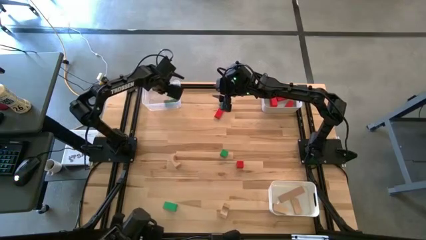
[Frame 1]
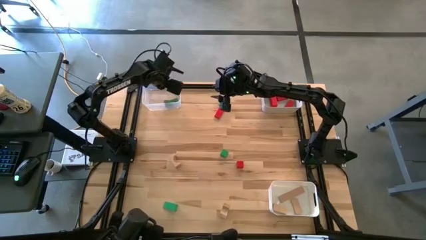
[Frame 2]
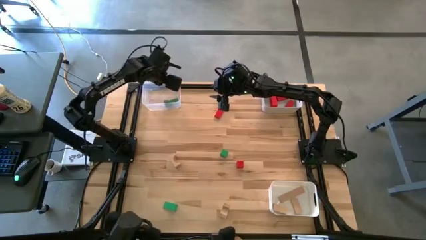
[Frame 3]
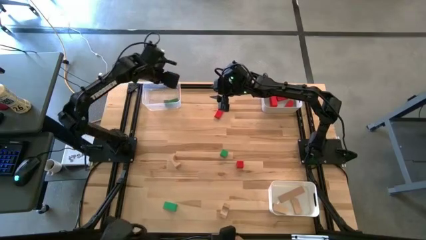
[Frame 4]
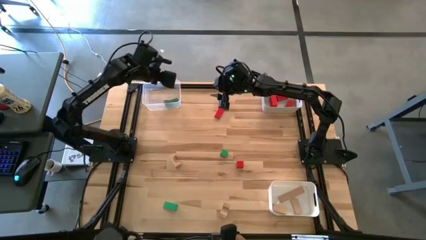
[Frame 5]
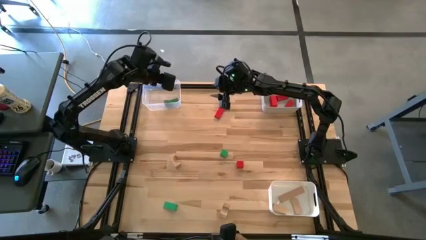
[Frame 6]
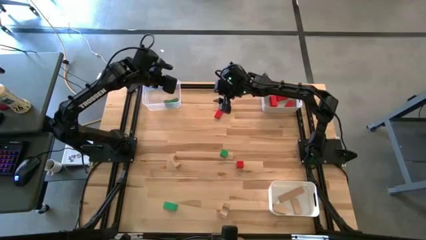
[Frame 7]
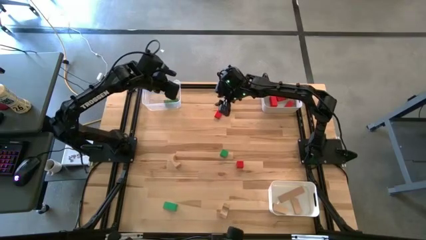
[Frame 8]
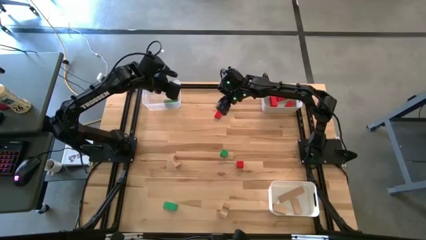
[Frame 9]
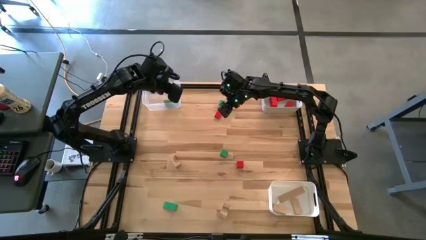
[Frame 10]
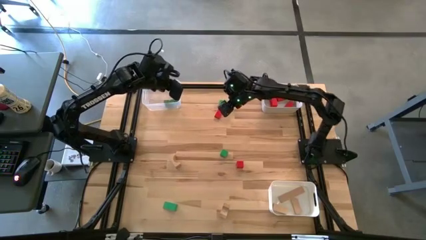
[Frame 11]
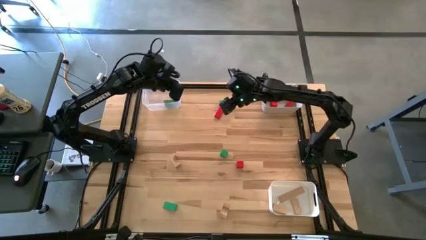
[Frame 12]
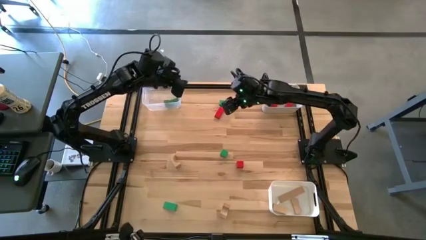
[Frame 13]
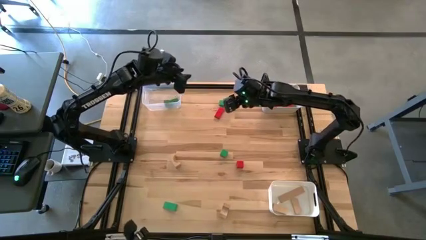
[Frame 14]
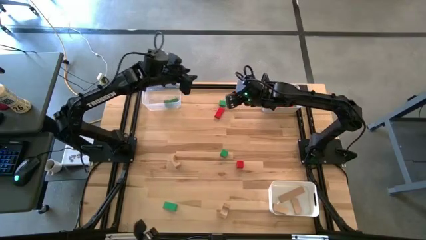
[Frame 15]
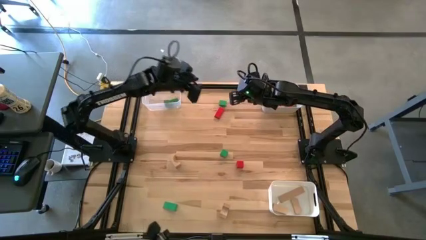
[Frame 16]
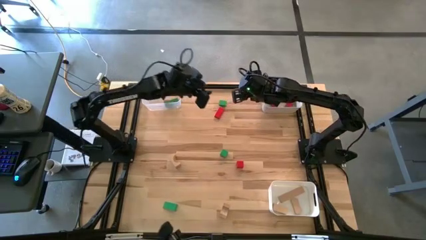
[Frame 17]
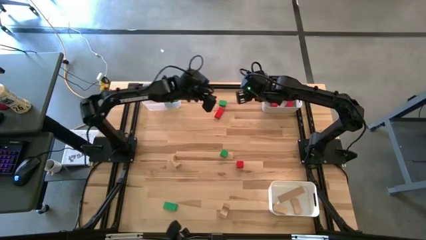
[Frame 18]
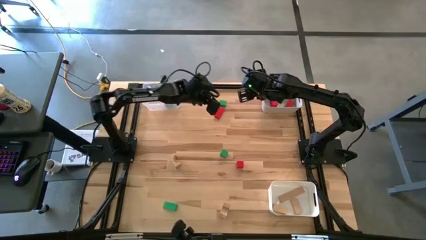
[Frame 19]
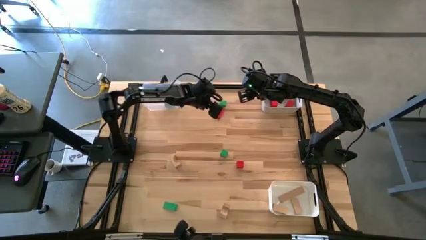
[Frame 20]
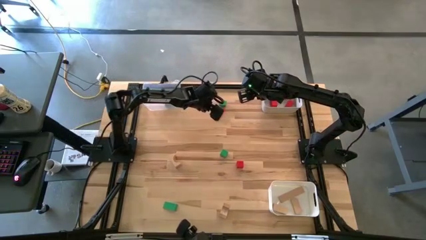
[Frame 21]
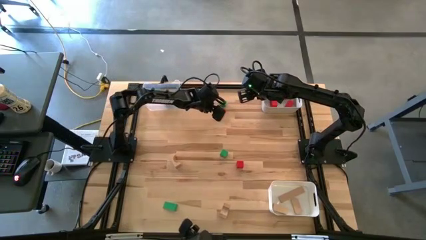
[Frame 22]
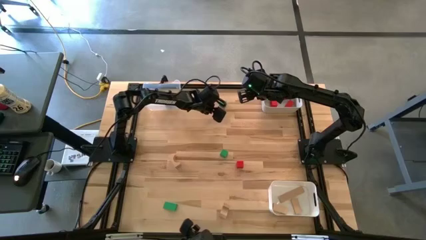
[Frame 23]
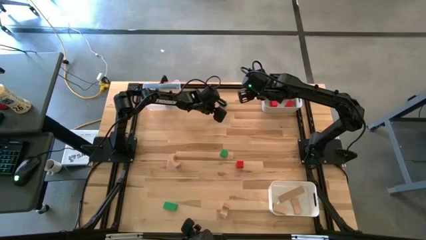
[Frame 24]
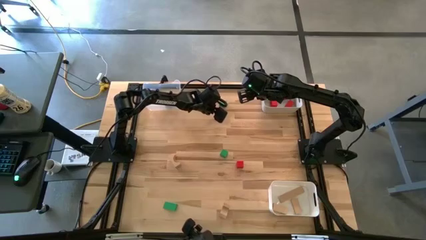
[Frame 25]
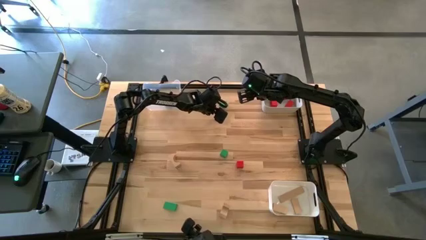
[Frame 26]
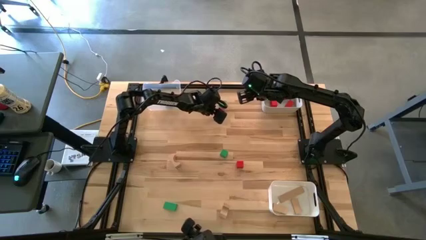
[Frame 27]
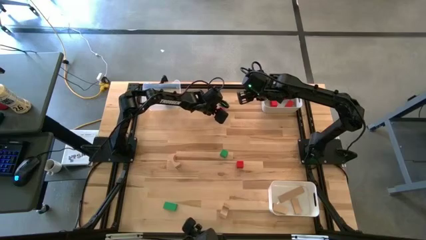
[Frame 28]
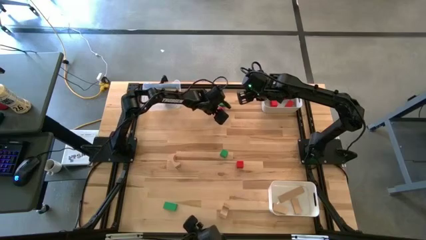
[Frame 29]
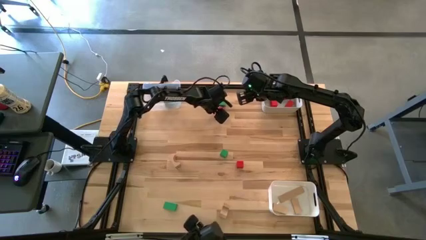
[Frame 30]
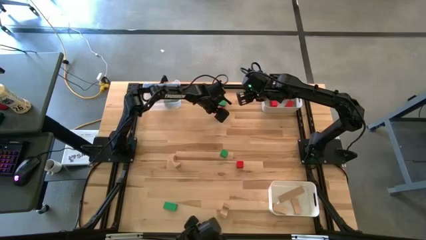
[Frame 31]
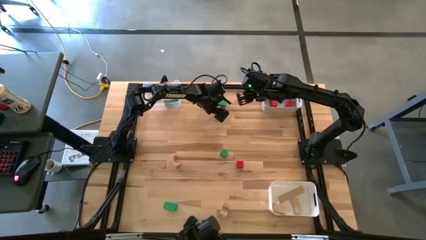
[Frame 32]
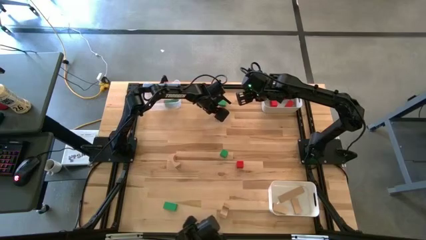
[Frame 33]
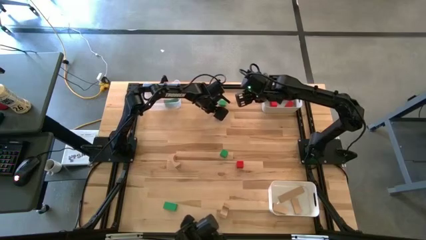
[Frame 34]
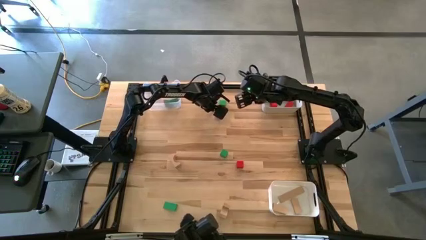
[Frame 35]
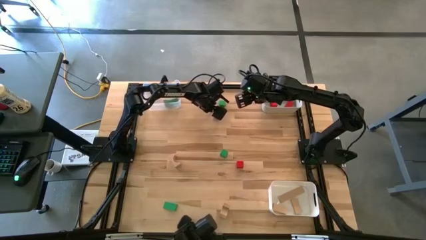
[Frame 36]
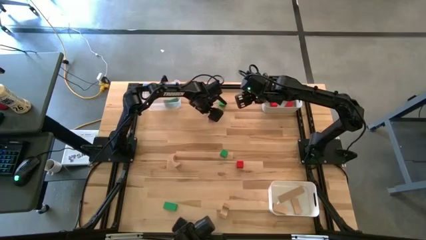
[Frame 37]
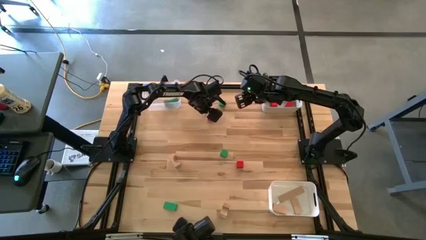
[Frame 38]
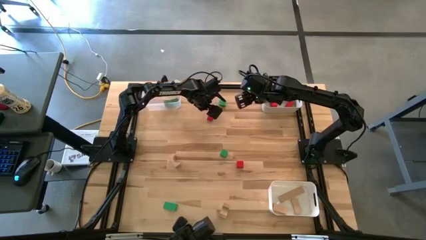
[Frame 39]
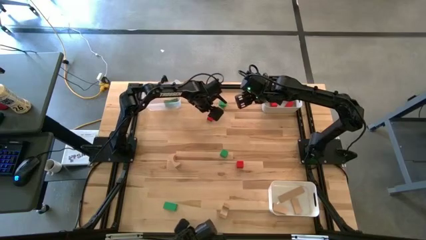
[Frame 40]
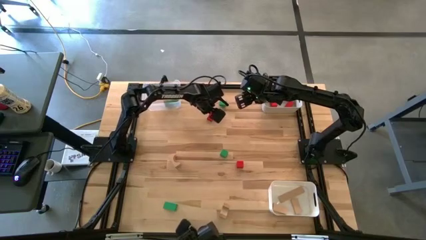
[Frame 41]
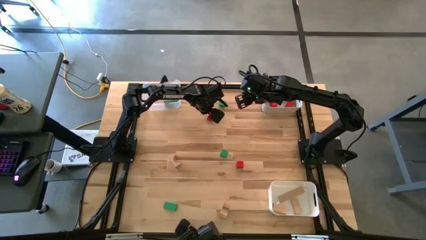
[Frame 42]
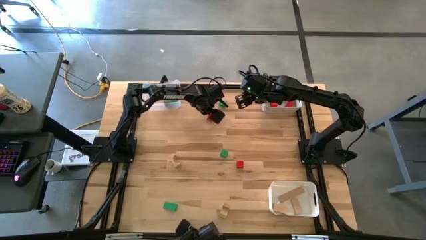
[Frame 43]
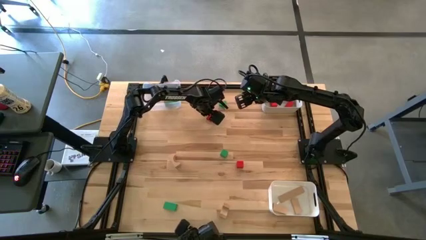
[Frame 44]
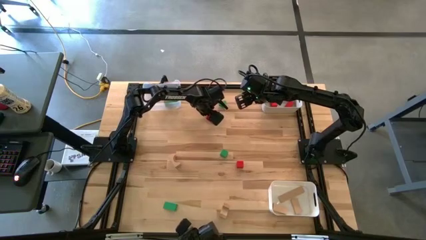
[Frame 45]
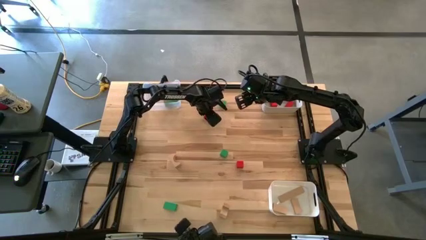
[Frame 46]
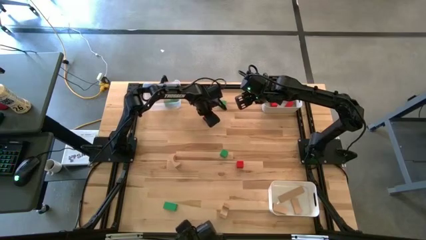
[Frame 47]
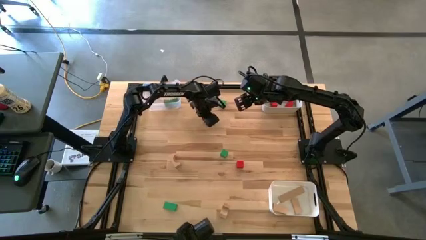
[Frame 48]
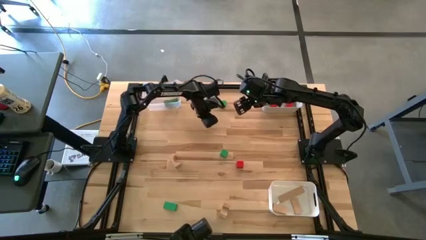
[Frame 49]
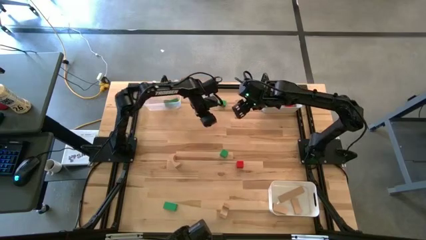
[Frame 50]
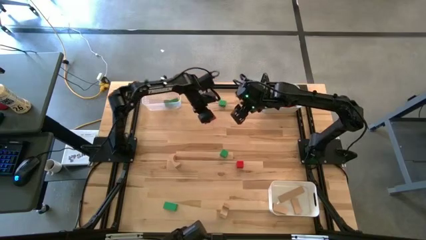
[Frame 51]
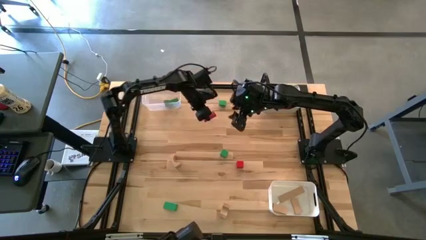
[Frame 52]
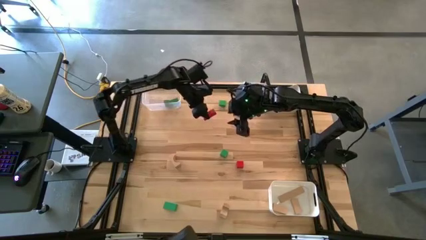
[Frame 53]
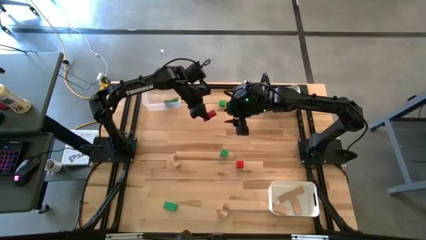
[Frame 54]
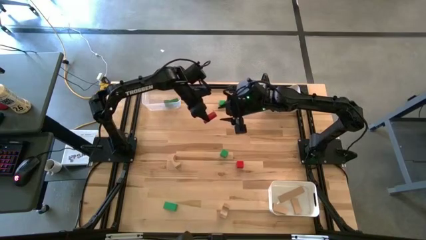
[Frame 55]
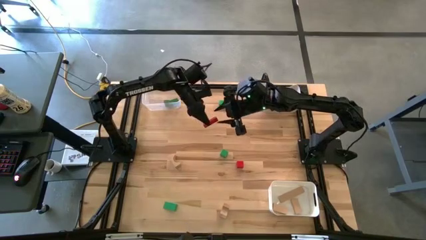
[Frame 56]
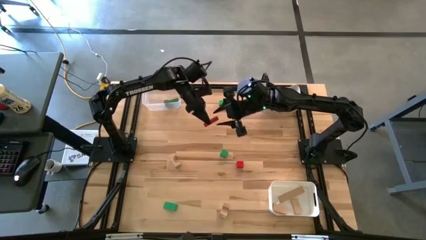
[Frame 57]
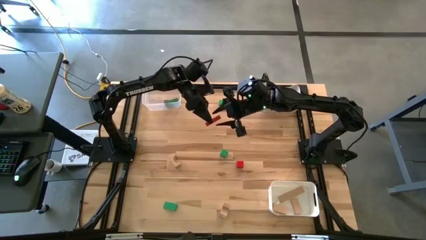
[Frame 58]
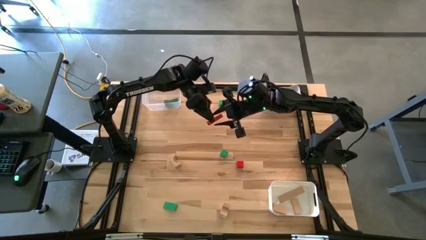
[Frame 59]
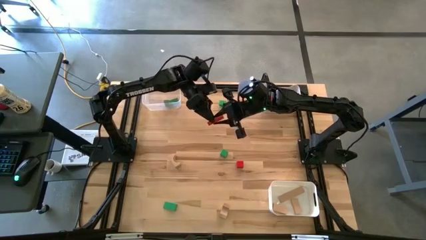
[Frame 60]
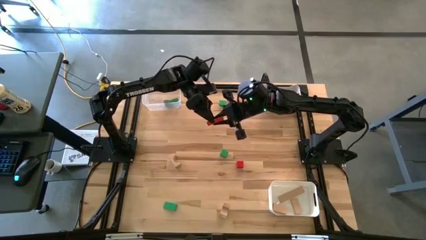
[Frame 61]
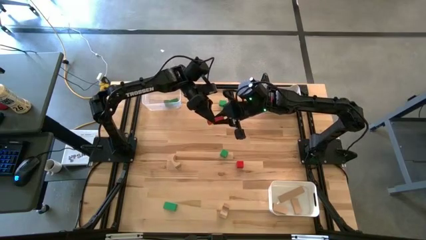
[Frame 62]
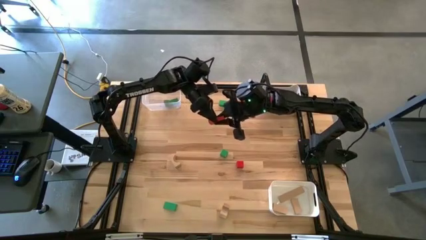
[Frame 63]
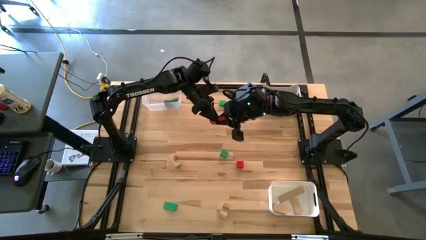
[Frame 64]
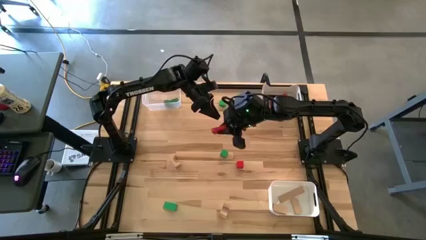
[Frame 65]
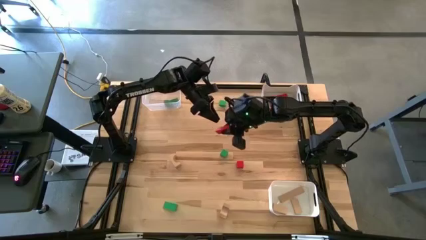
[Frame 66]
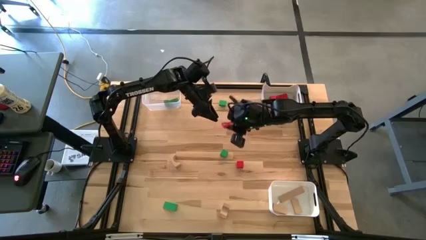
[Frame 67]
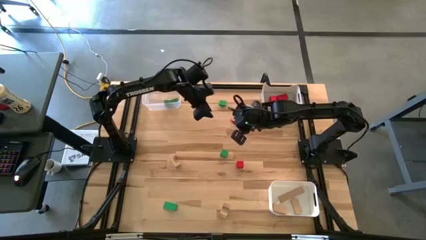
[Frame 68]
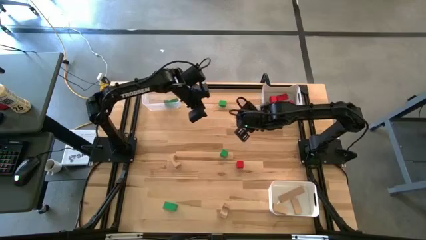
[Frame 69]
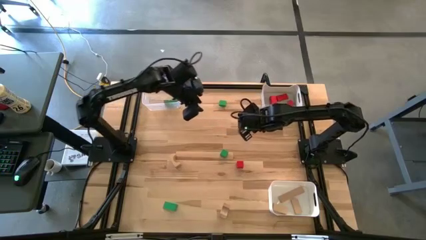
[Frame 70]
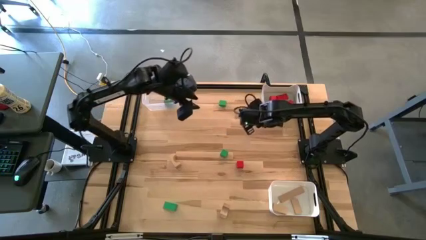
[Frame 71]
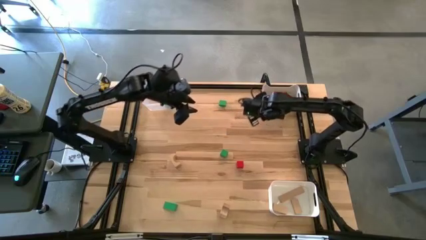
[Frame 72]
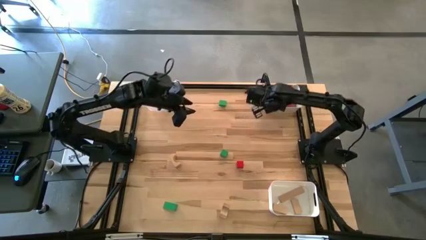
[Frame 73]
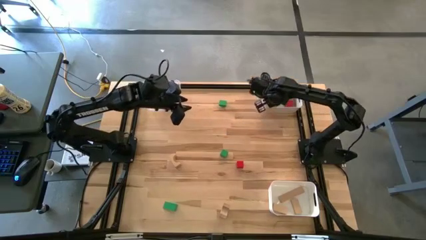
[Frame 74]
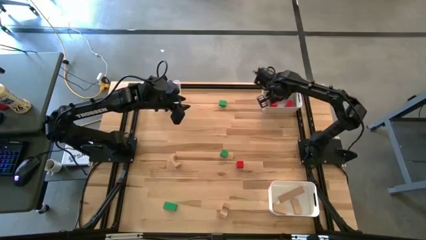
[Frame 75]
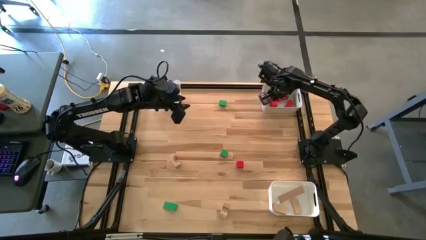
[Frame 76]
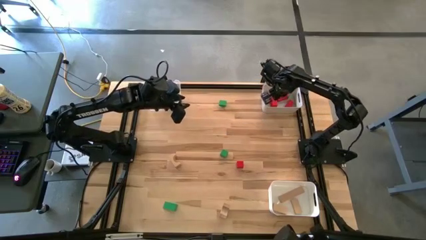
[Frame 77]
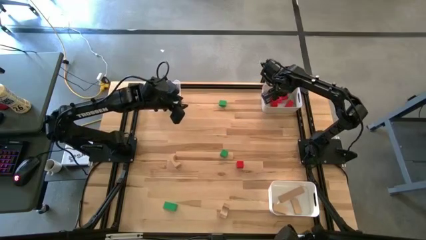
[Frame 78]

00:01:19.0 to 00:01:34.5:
Task: Sort & place blocks by color
Put the red block into the gray bin
